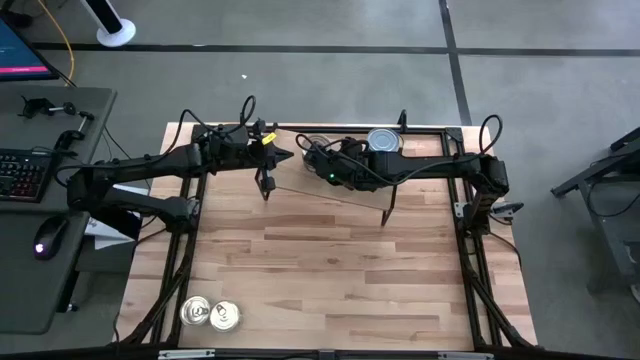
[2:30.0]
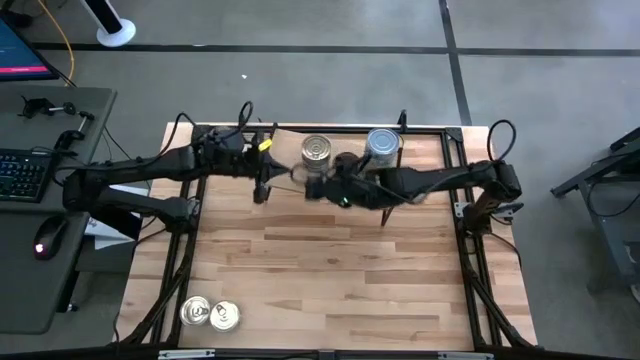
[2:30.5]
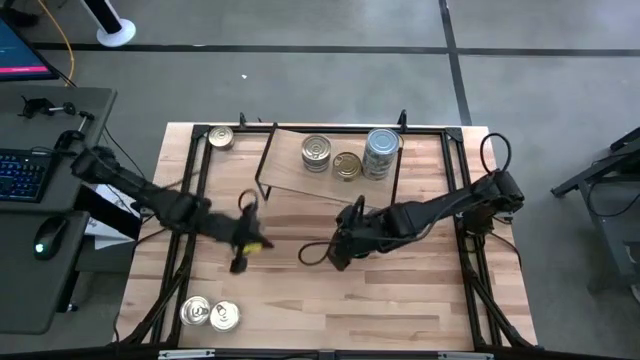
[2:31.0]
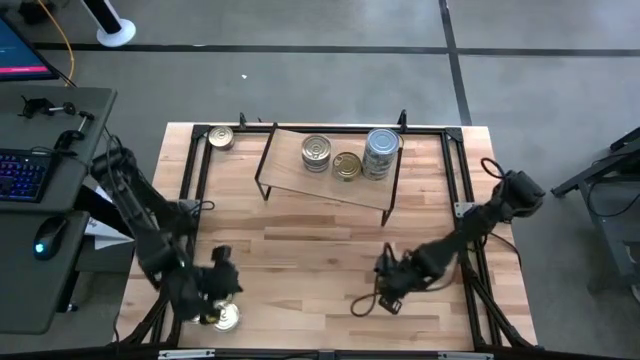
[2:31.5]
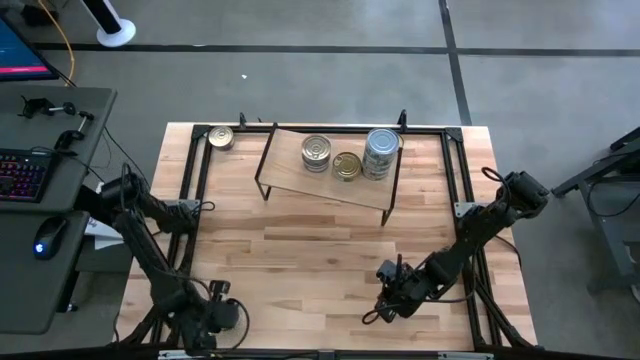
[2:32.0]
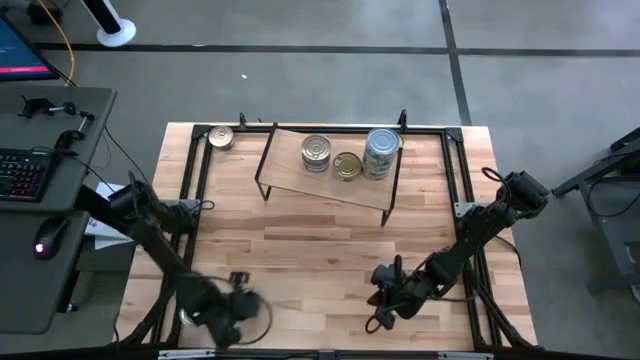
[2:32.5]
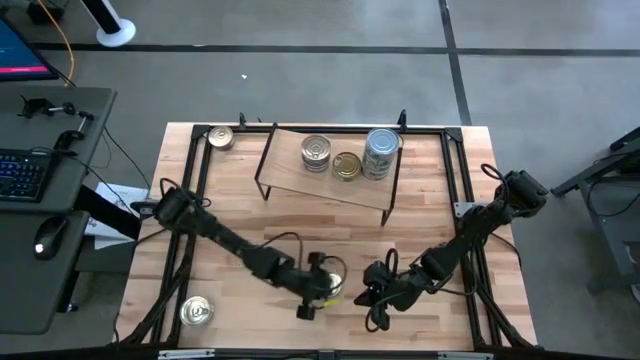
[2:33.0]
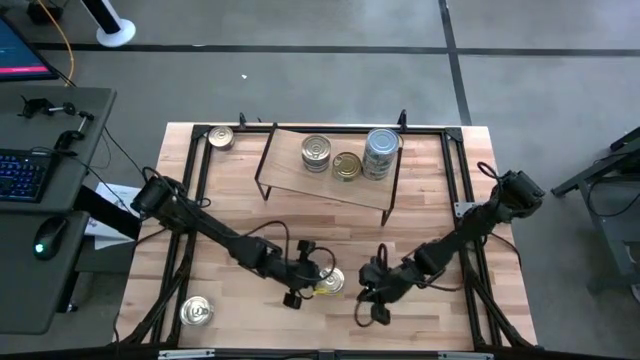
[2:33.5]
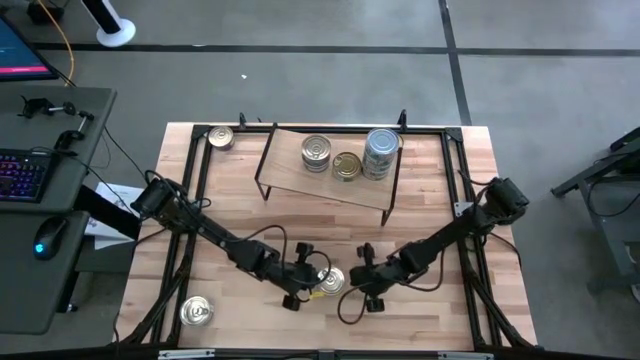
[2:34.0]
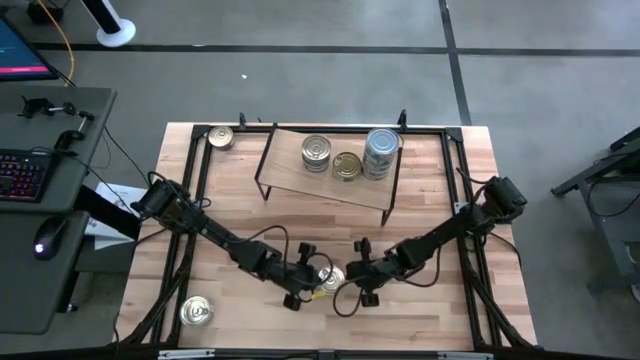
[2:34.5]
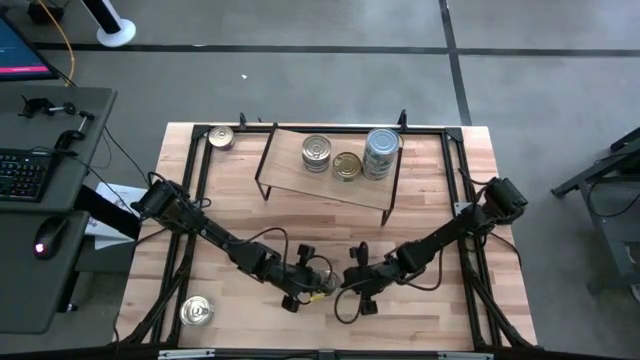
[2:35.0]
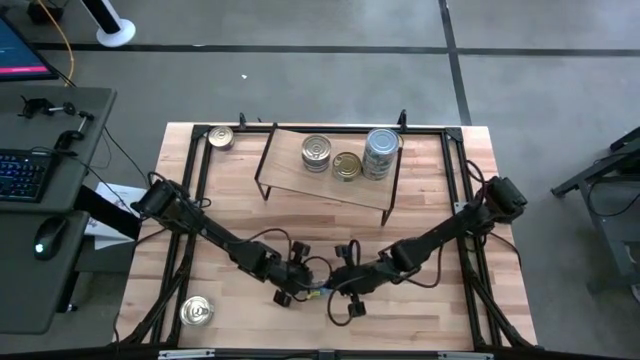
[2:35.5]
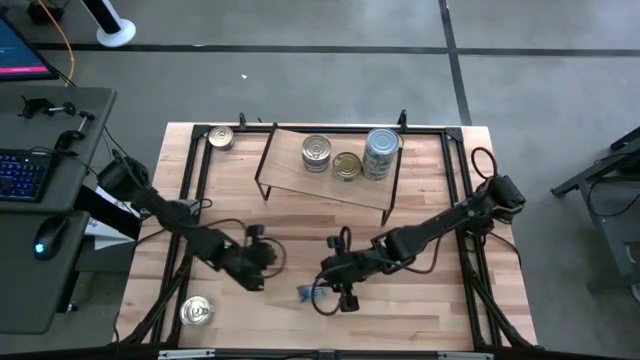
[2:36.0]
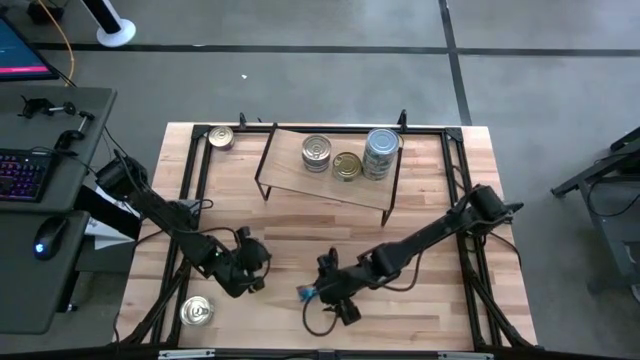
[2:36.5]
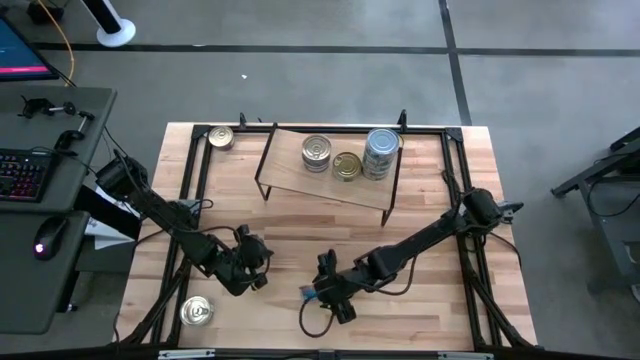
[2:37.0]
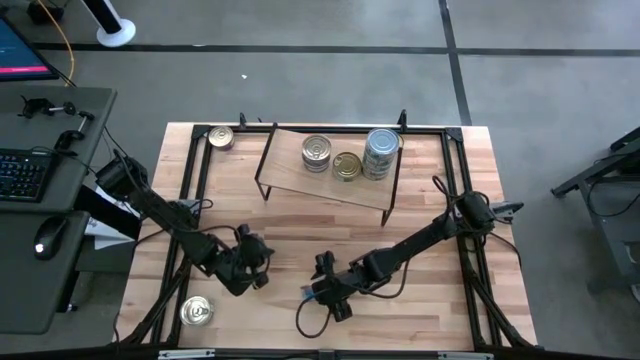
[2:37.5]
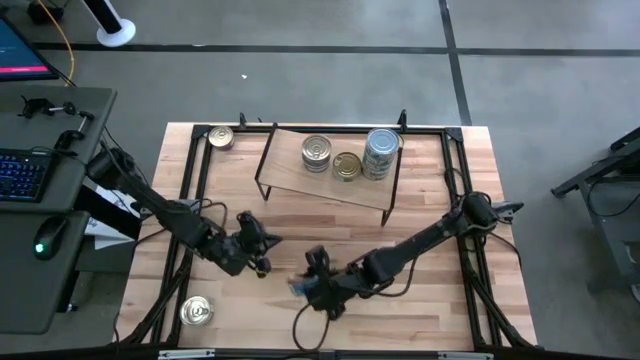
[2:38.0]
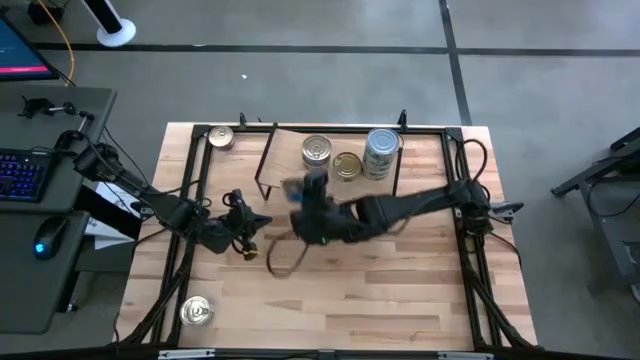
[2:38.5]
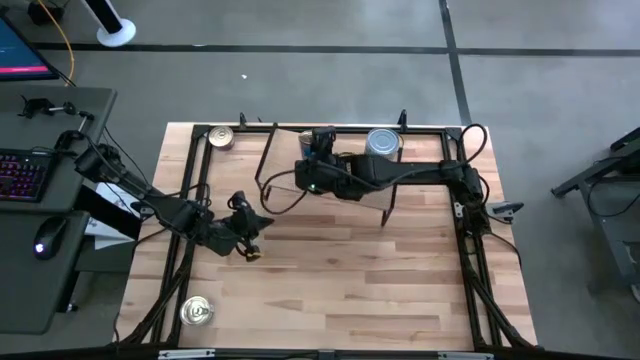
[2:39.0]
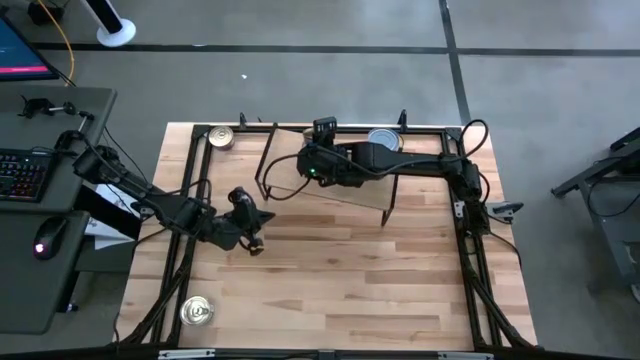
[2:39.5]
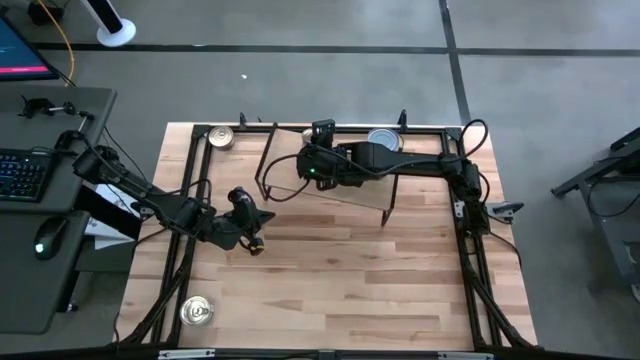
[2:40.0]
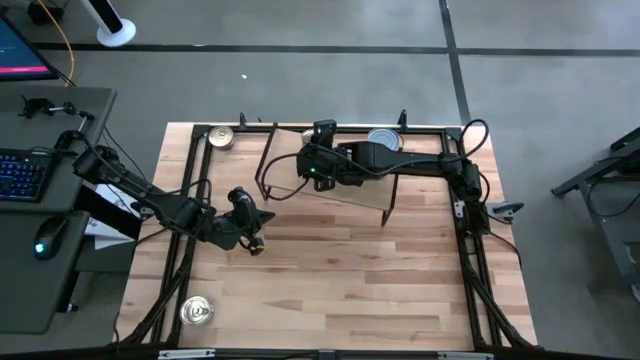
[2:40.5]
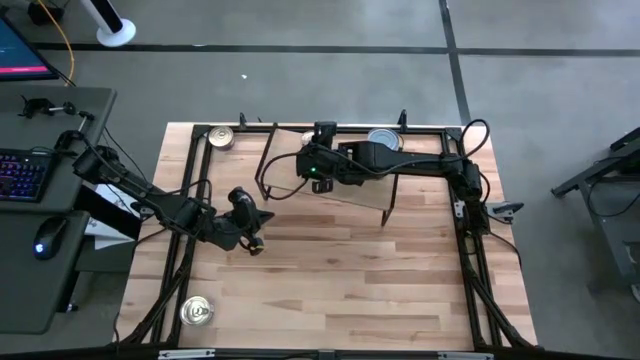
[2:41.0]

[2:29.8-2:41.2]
Task: Stack canned seafood by type on shelf
Stack the blue pink tuna can on top of the other blue pink tuna can on the shelf

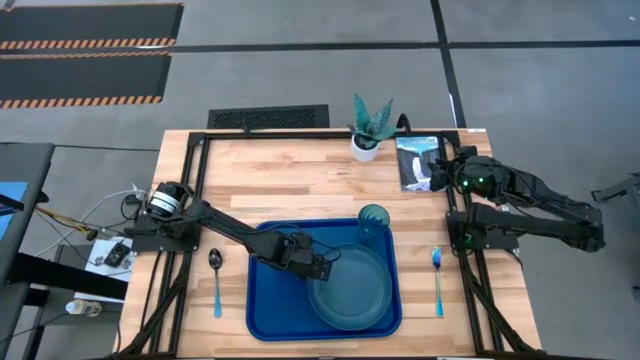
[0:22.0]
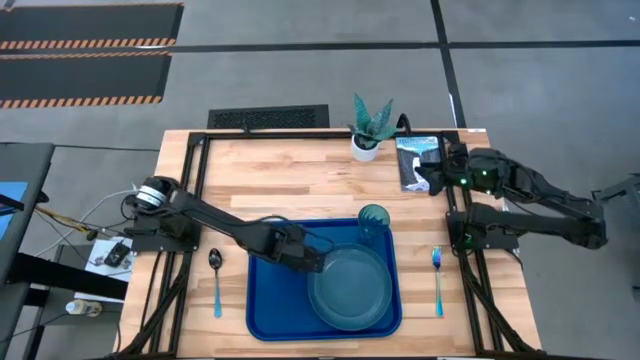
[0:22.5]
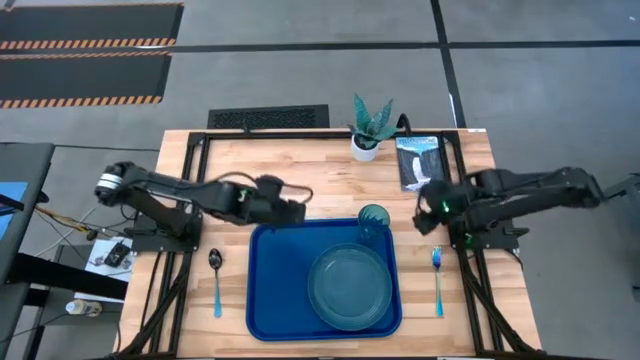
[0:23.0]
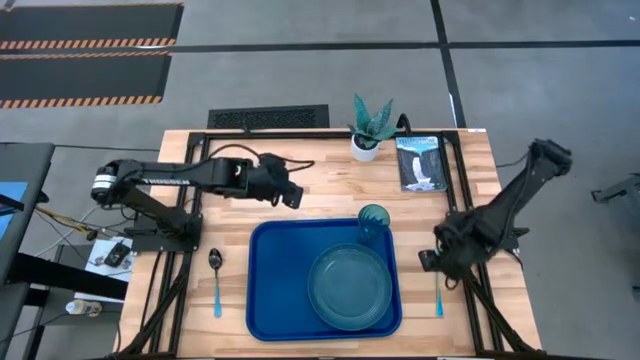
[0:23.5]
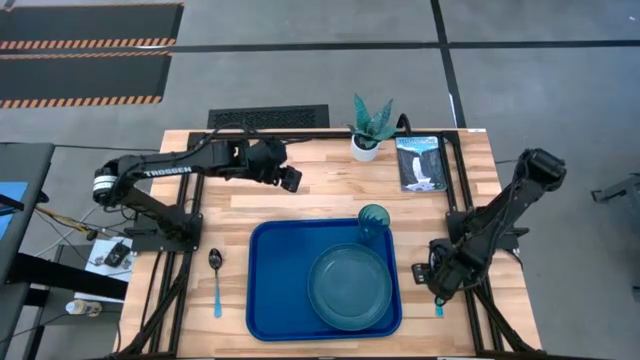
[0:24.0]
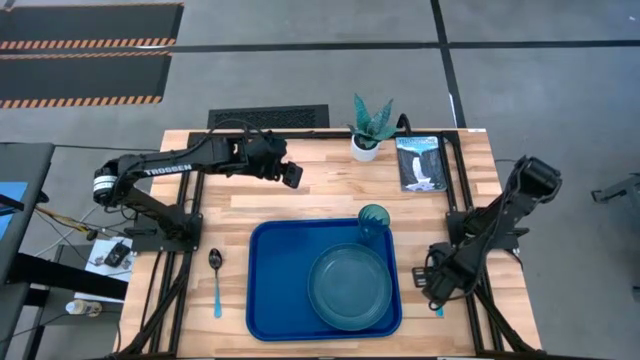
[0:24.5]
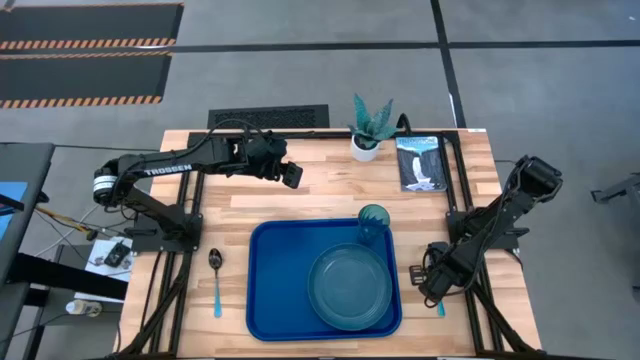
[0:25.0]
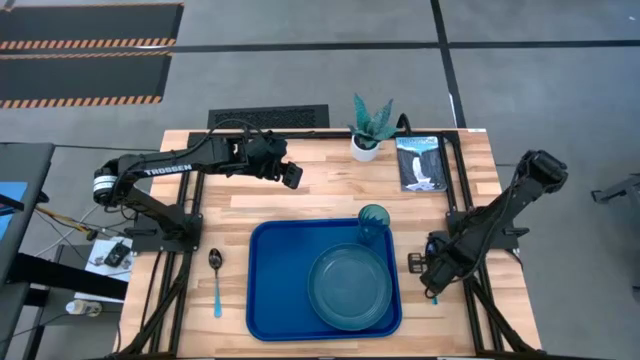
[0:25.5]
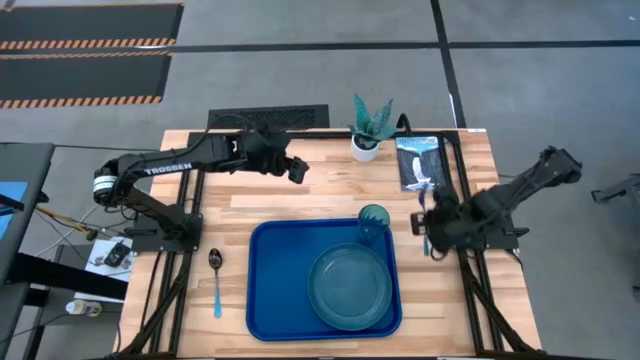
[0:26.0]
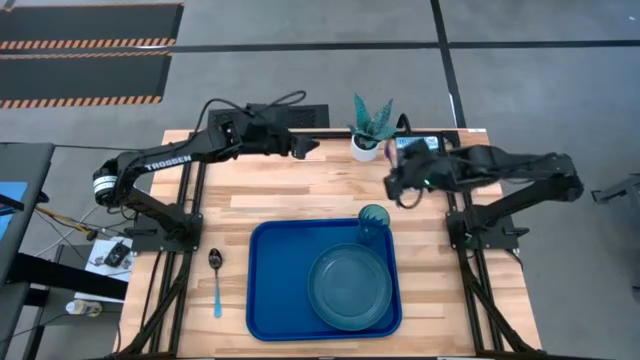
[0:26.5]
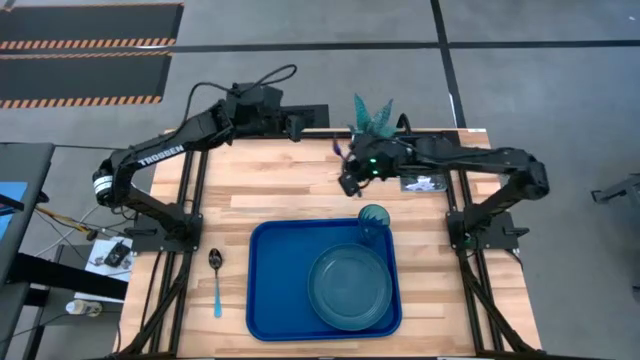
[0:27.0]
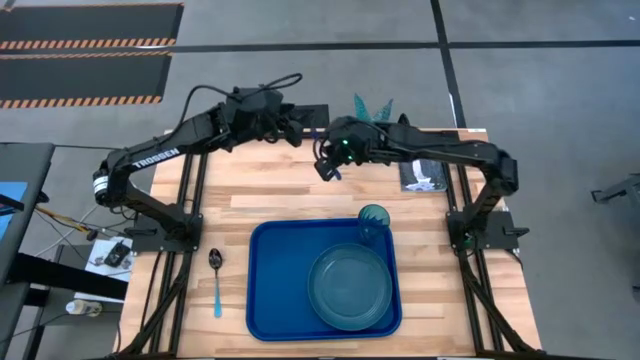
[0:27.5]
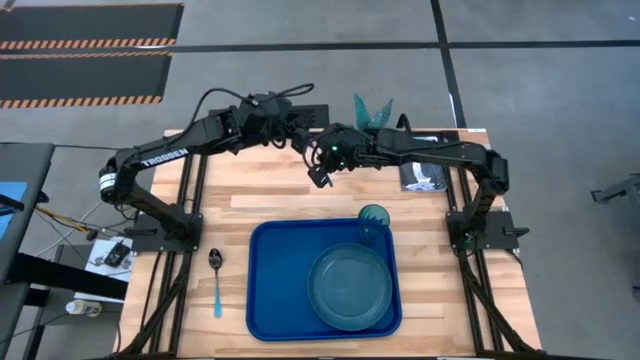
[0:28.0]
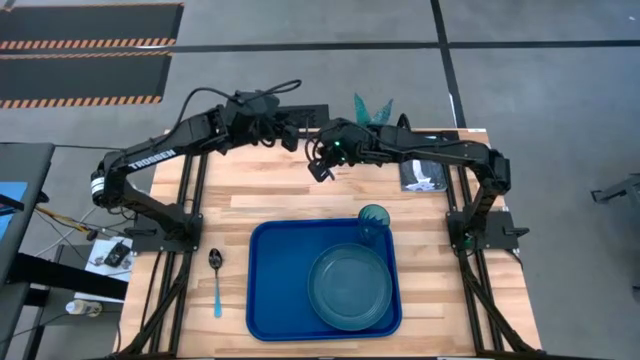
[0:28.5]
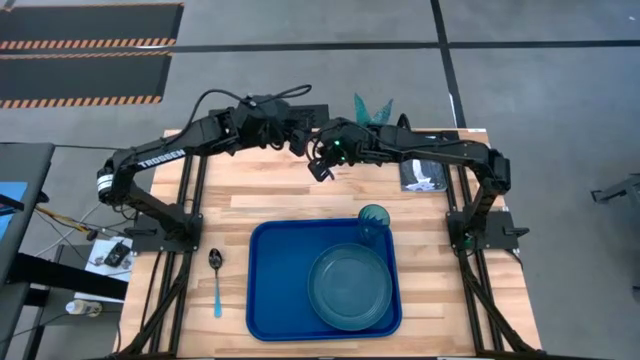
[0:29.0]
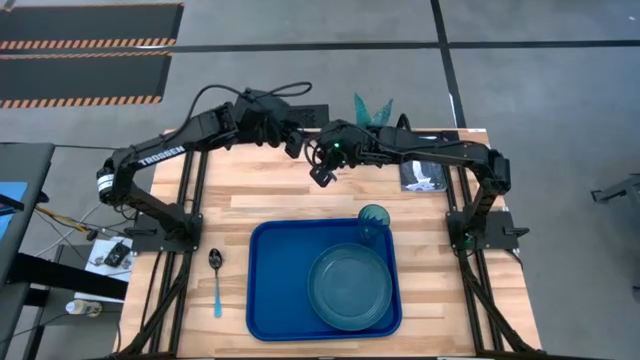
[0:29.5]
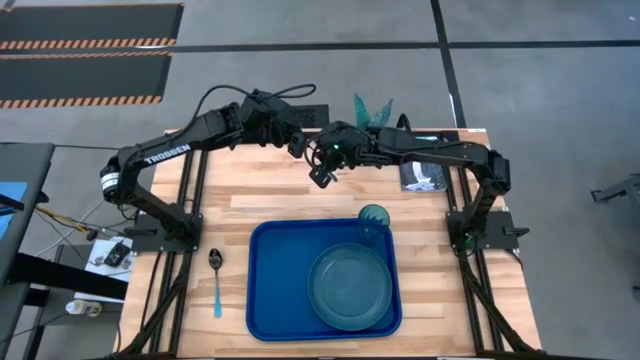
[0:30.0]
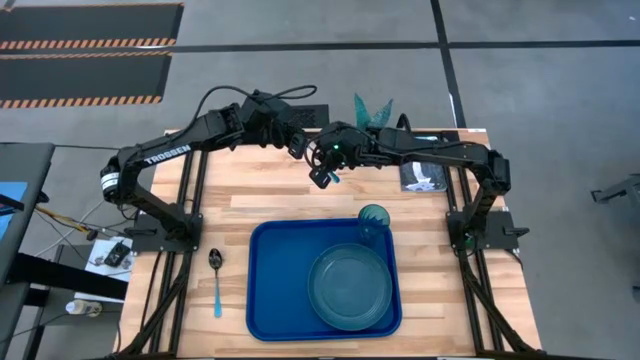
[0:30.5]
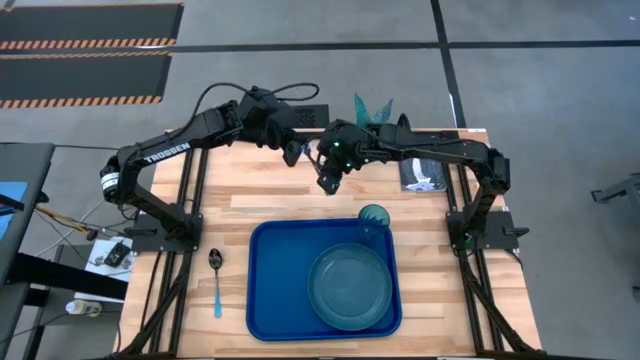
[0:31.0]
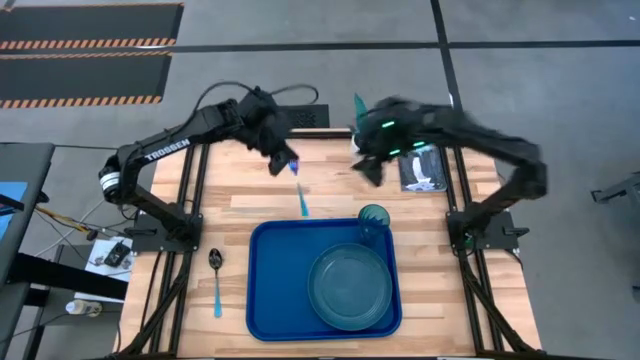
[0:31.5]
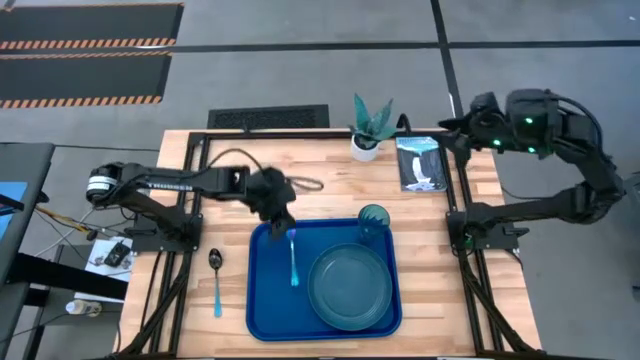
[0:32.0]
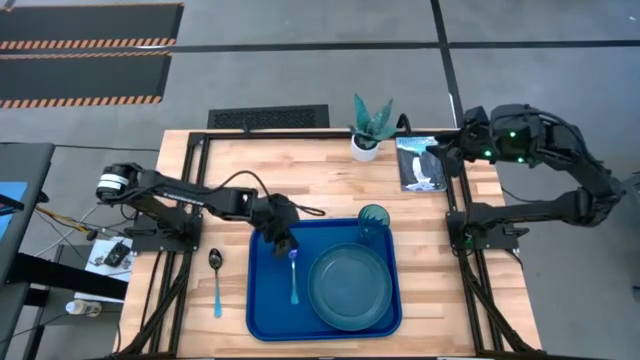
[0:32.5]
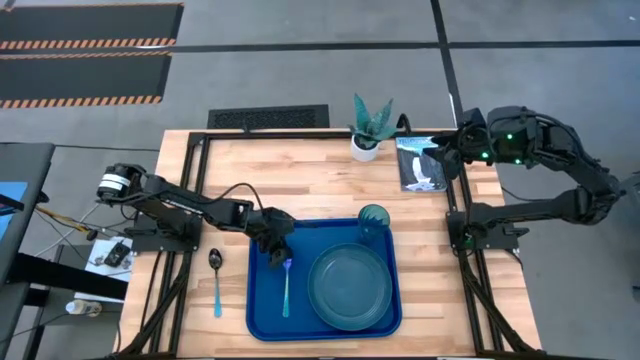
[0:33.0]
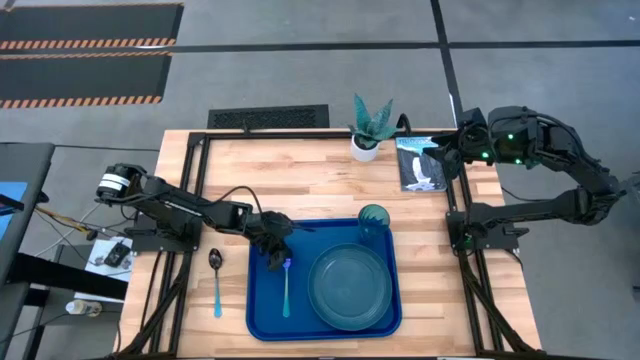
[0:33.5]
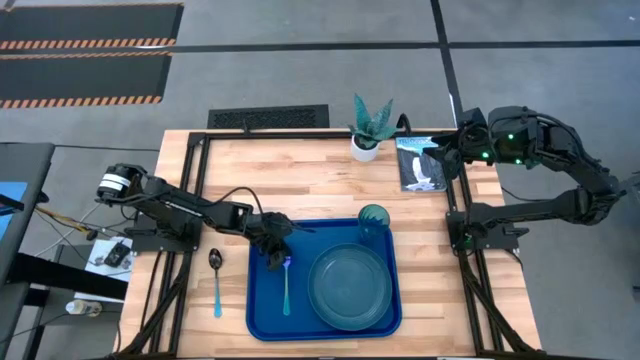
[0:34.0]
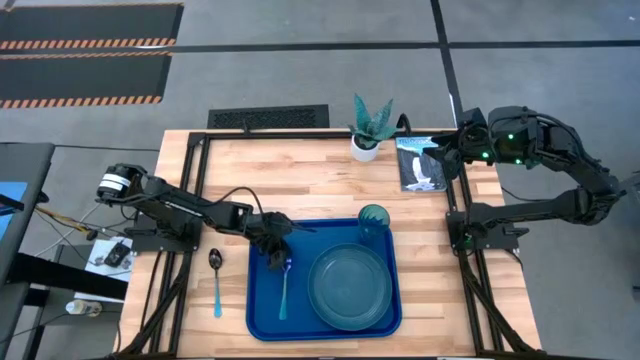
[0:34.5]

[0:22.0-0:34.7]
Task: Pick and place plate/cup/fork/spoon on tray
Put the blue fork on the blue tray to the left of the blue plate
